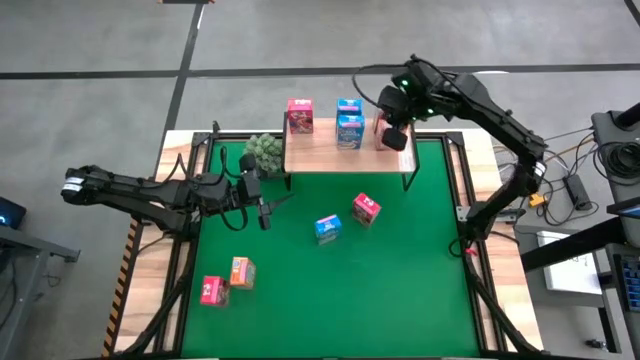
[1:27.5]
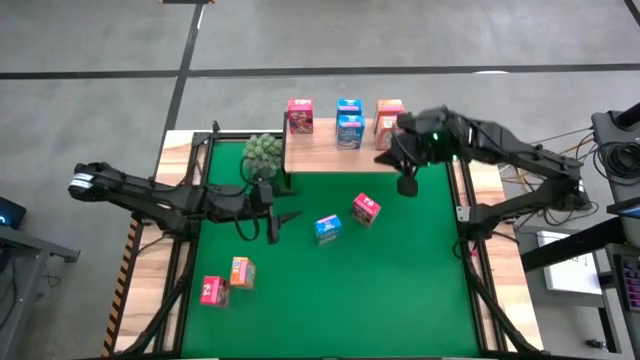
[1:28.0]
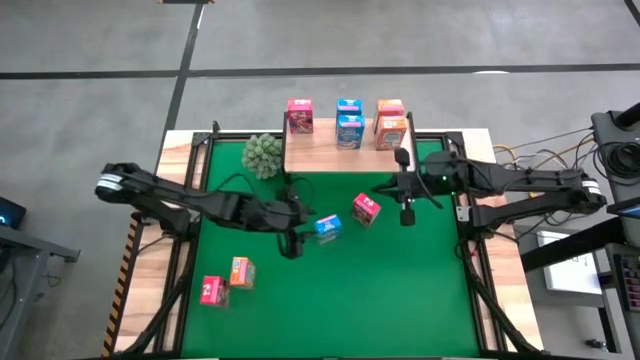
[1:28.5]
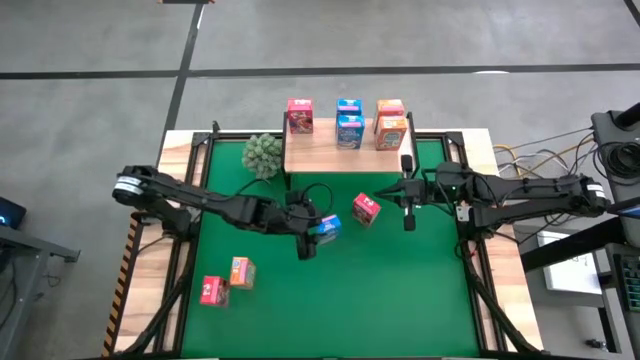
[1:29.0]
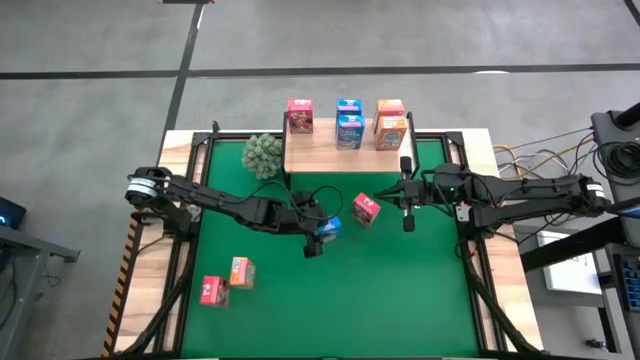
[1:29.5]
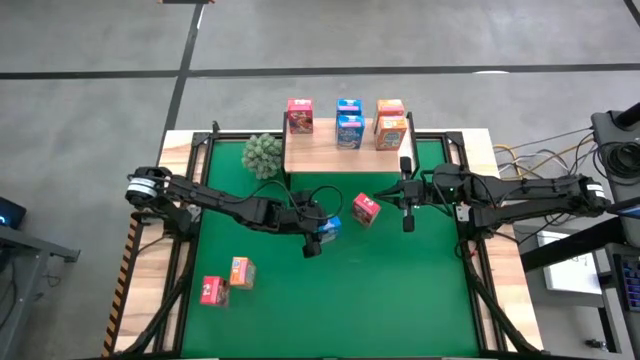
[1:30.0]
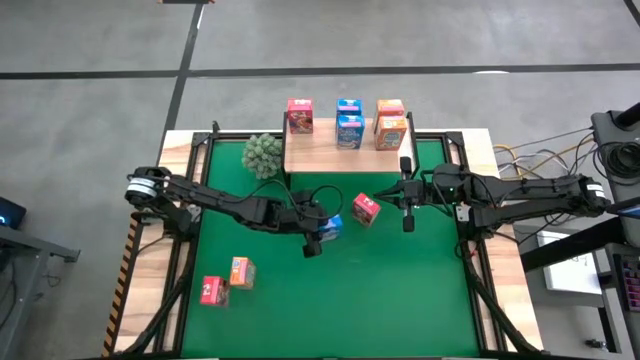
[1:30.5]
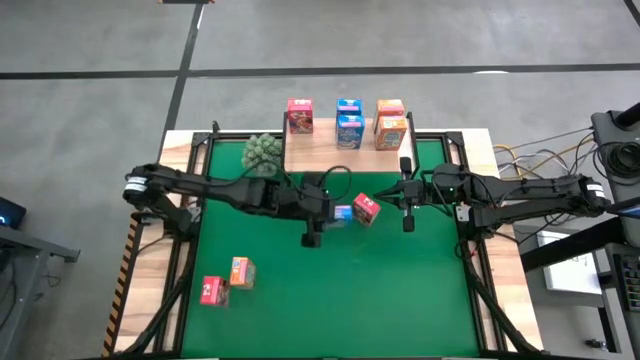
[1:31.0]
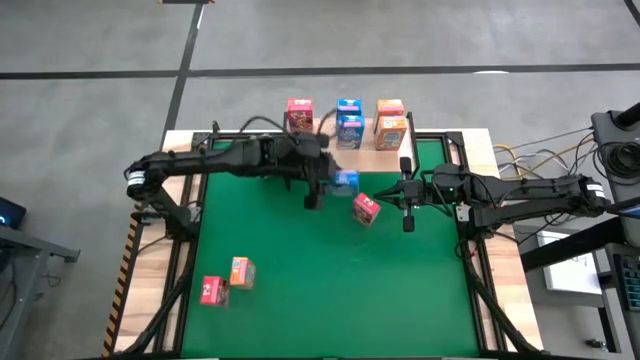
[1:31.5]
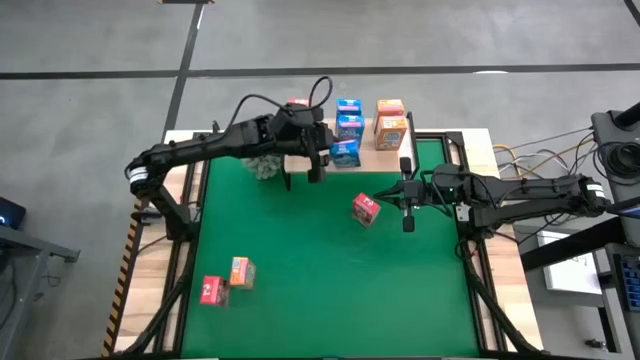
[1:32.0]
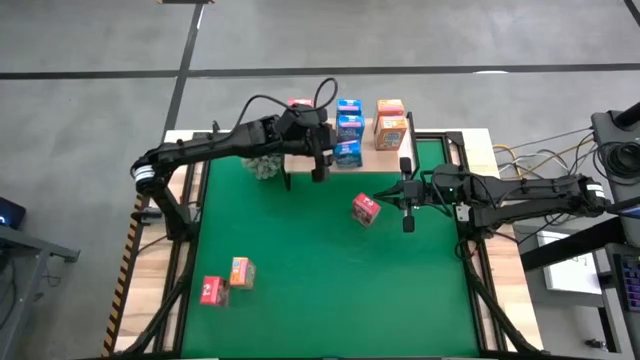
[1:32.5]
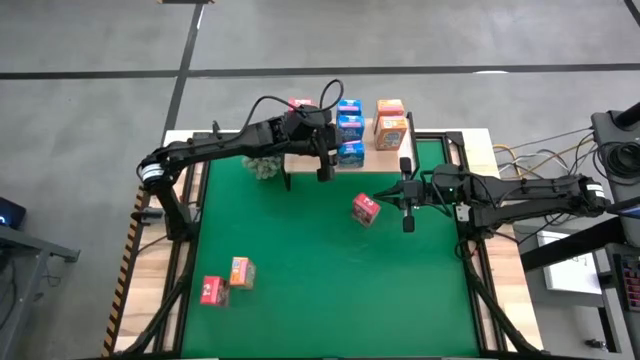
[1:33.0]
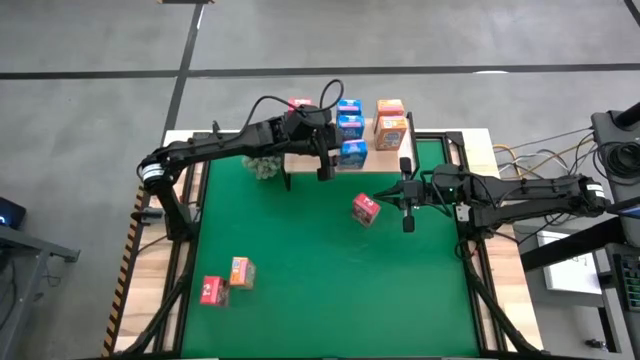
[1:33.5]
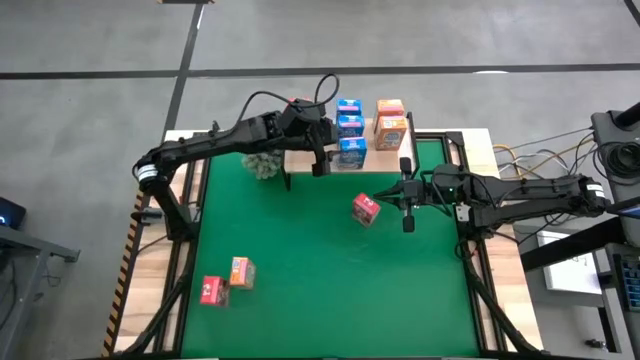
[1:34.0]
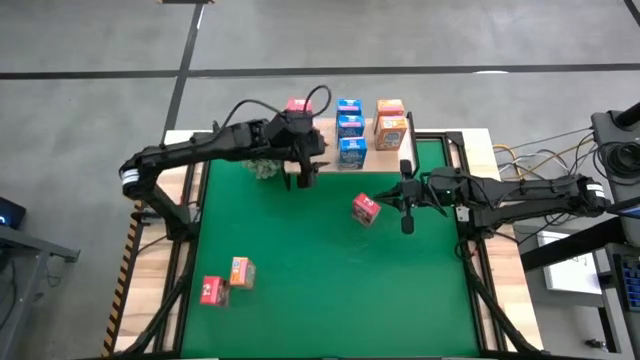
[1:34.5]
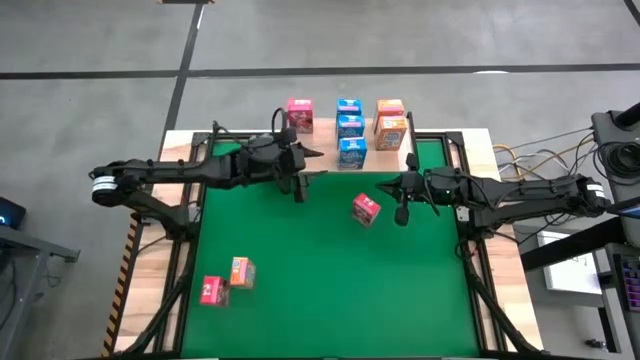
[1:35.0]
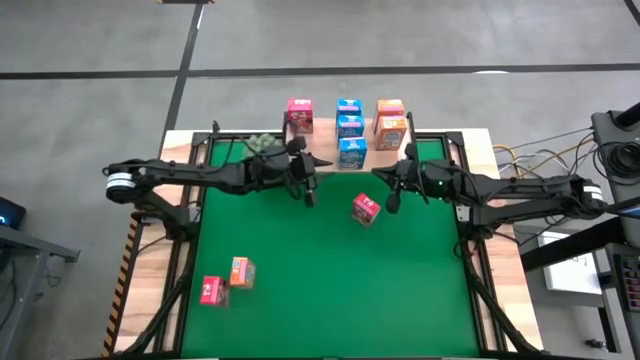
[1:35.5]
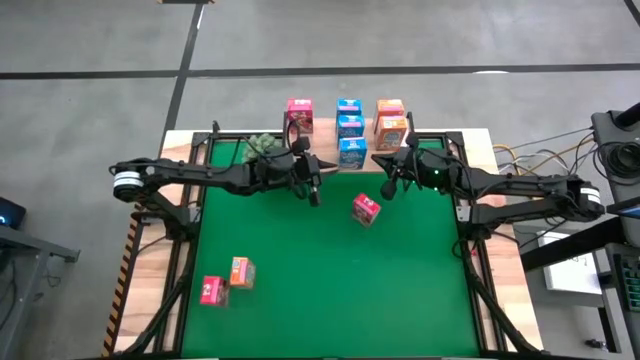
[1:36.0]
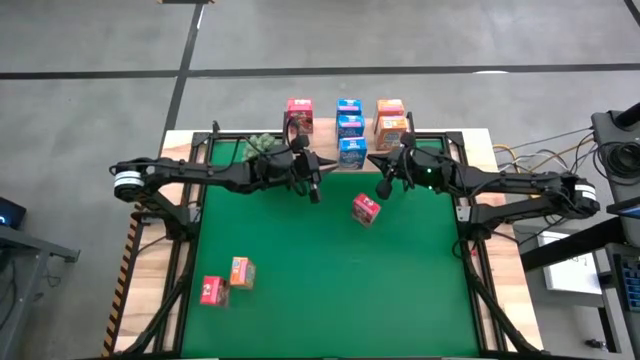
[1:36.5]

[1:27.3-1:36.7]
Task: Stack cereal on shelf
Put the blue cereal box on the shelf aligned with the other blue cereal box

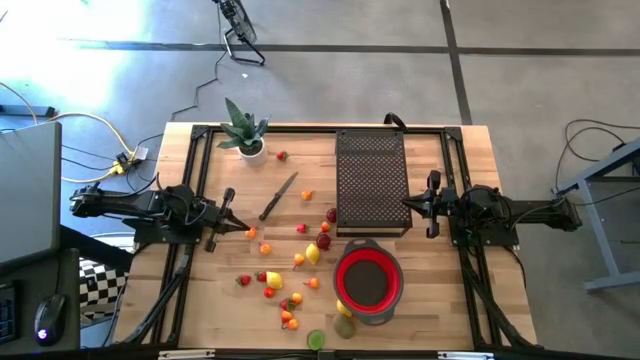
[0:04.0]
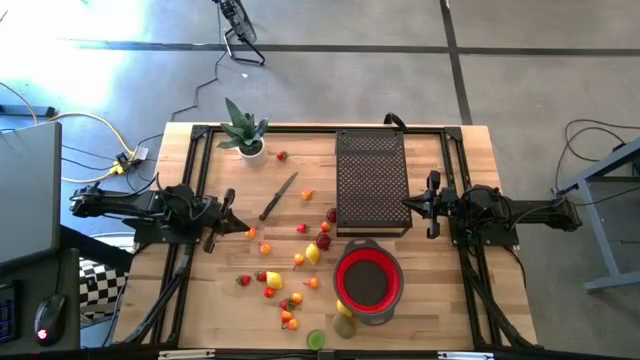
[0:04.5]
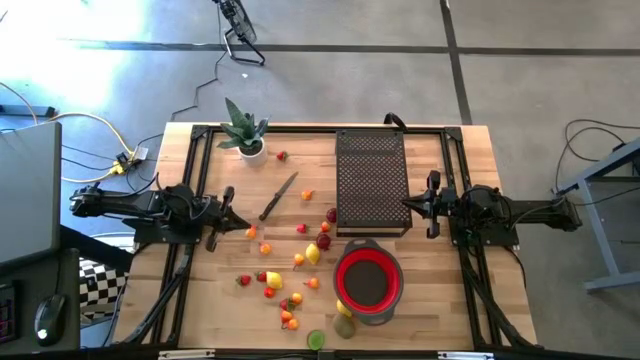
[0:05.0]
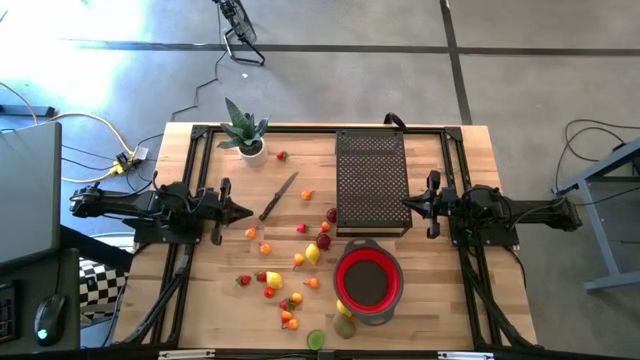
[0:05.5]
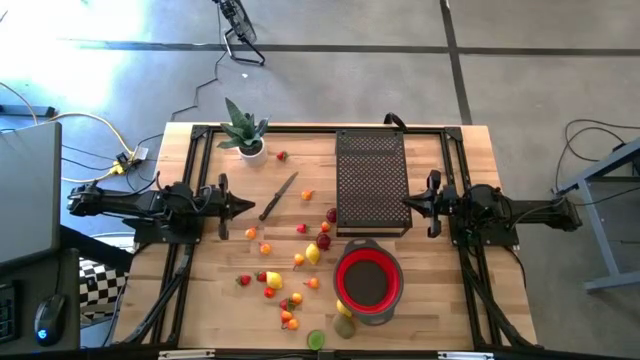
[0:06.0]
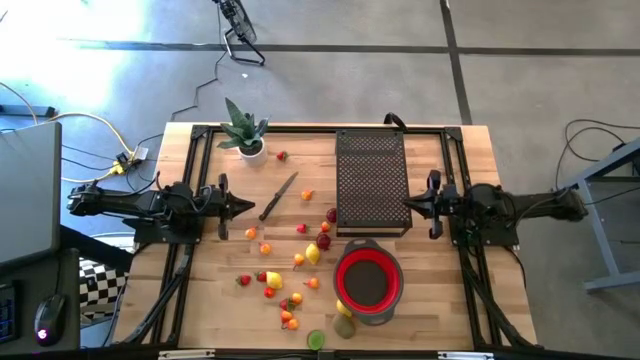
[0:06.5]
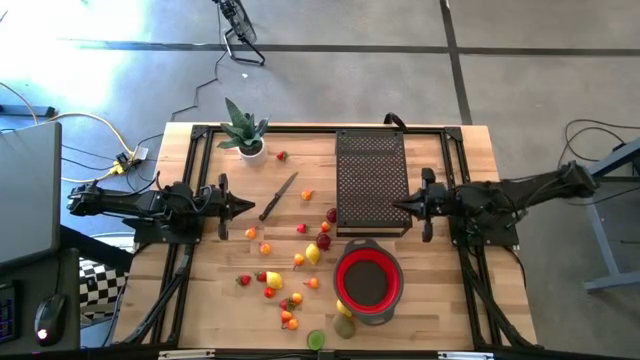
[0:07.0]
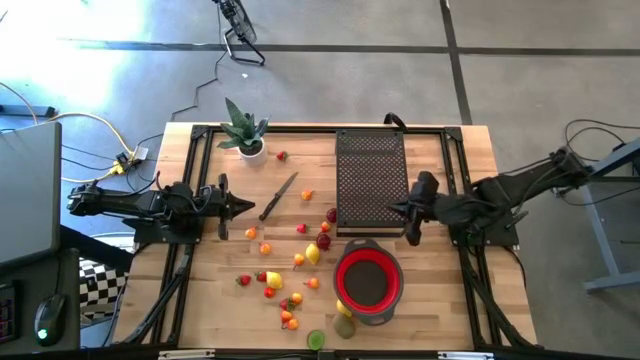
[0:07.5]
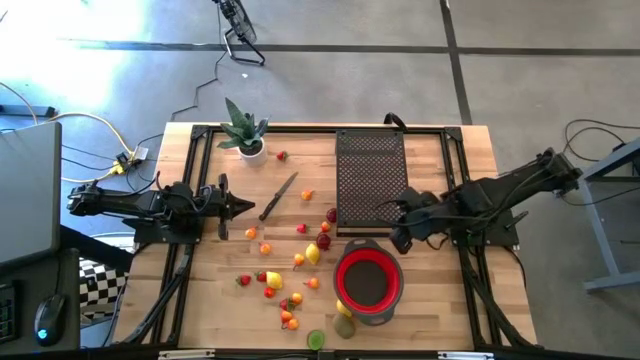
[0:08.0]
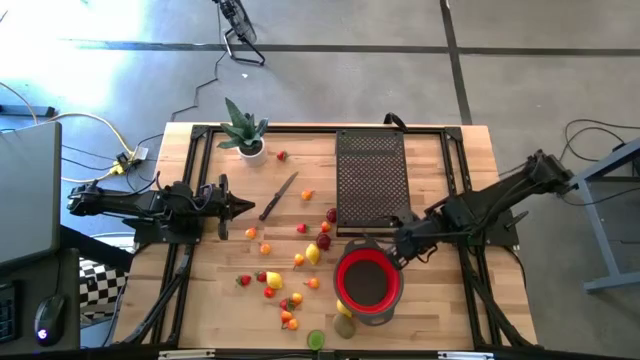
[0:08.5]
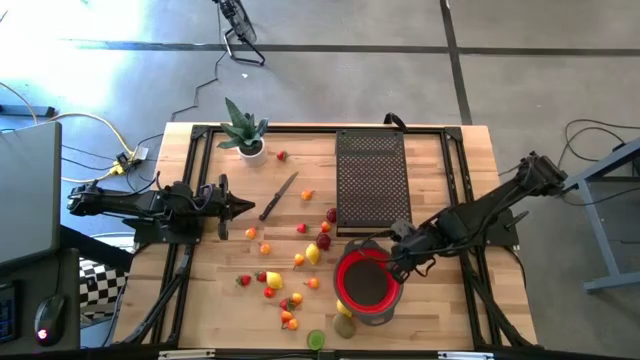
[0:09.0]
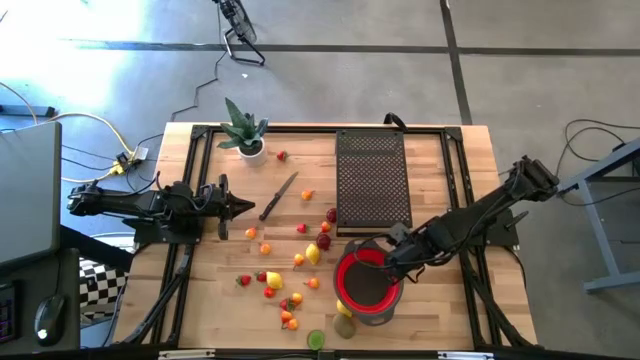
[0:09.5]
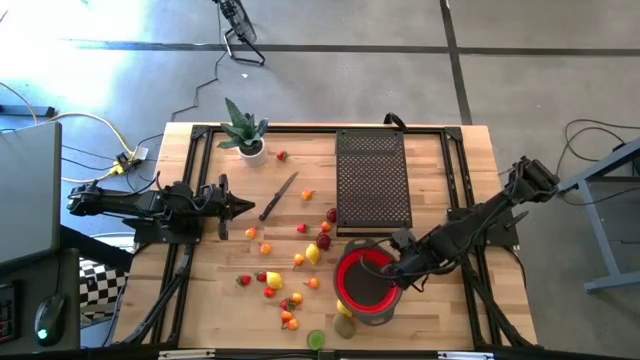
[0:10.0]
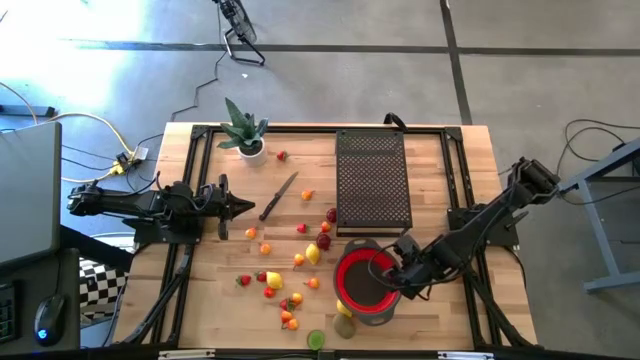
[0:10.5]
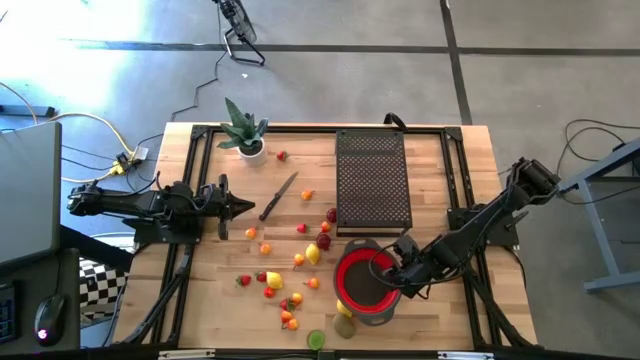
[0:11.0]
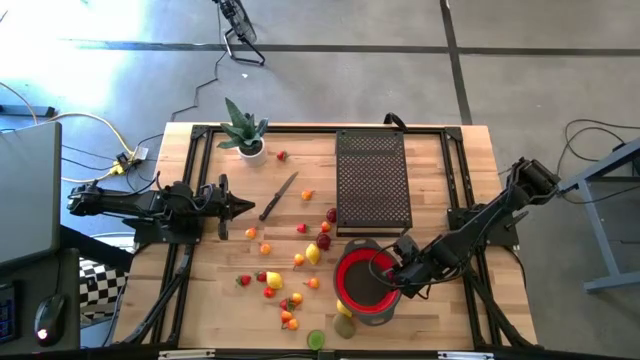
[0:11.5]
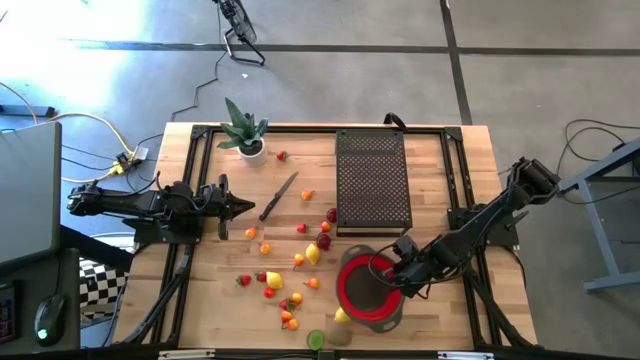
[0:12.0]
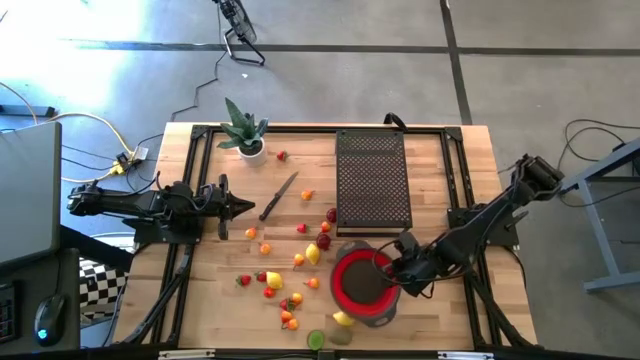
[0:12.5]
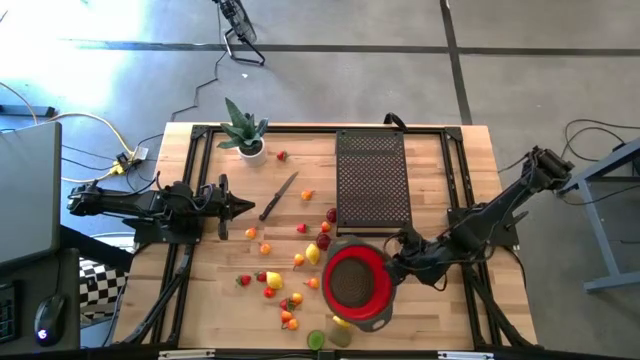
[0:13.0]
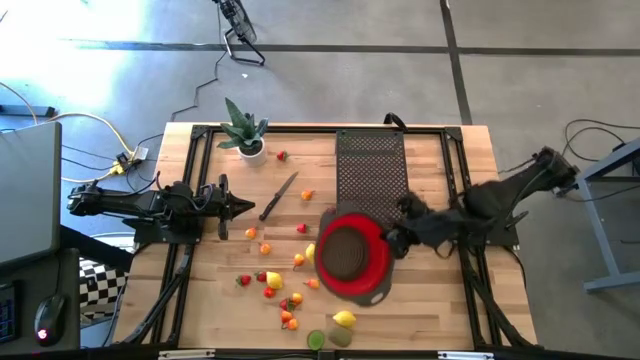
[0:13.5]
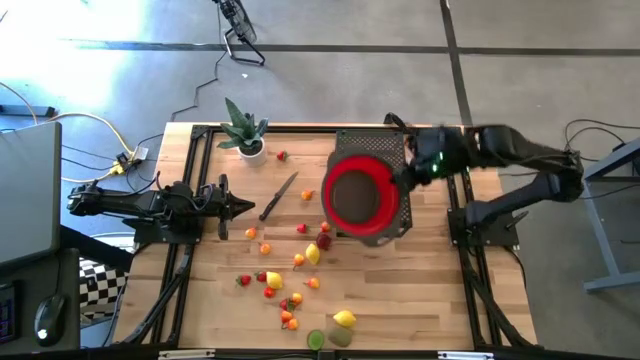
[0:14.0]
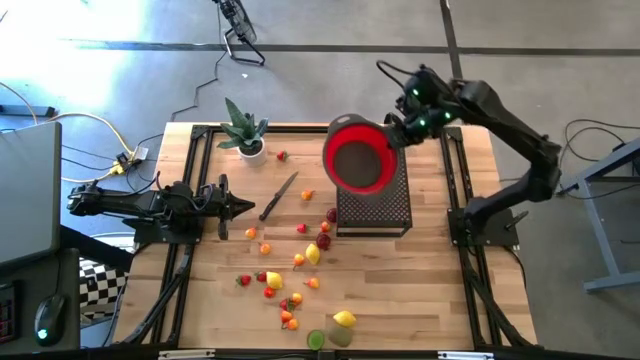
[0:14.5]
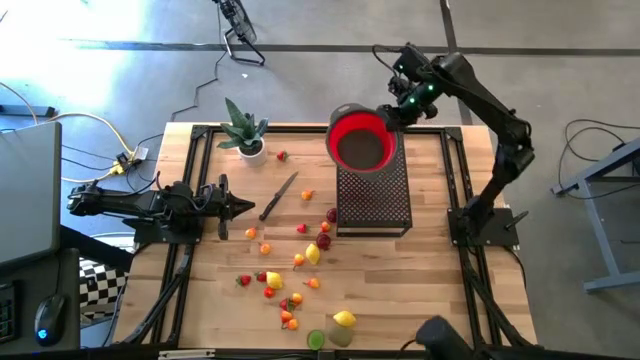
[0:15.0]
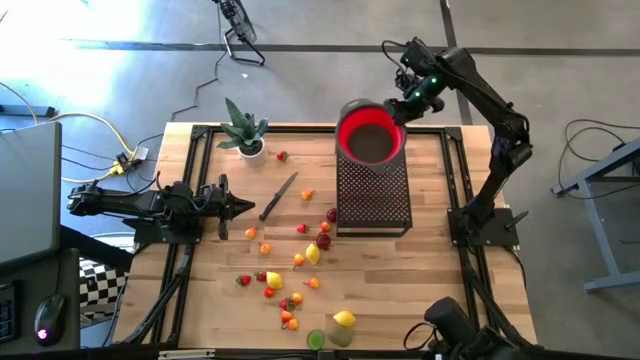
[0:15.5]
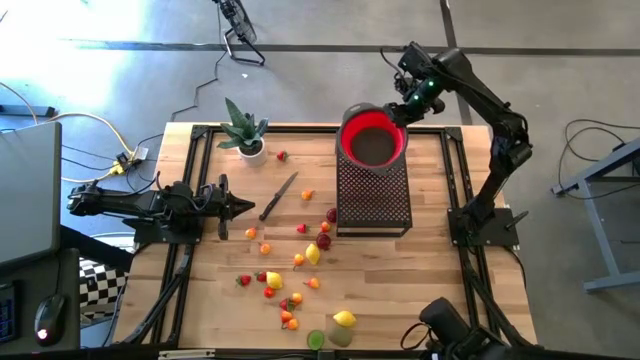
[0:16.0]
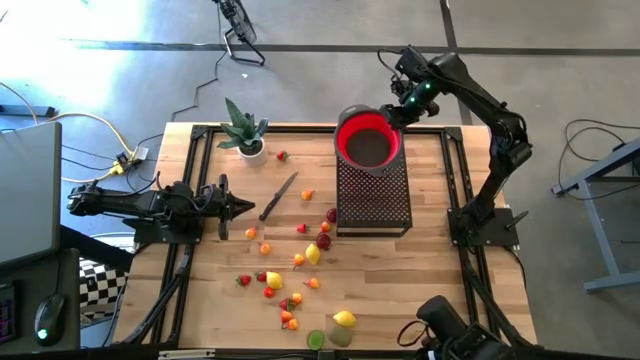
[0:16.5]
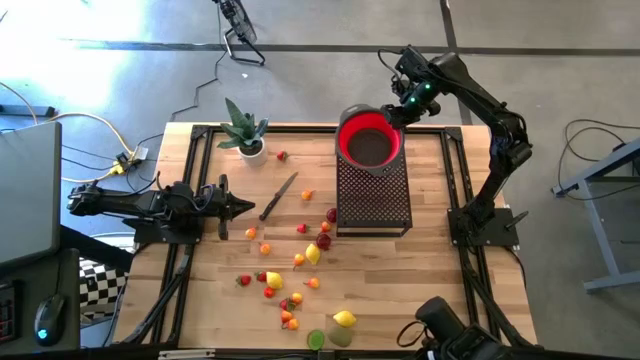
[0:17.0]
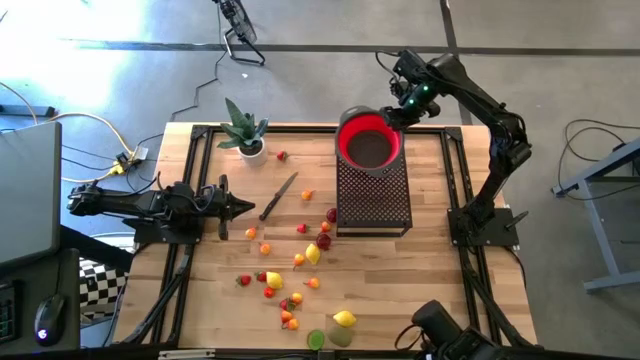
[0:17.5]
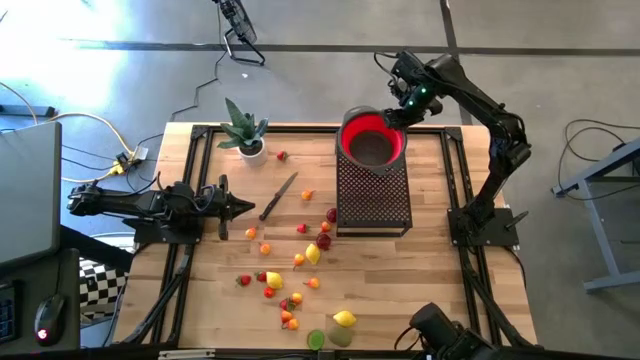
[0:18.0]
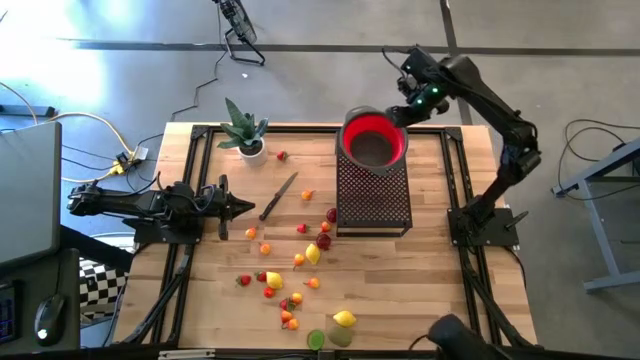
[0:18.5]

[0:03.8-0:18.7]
Task: Pick & Place Fruit
Put the red strainer bowl on the shelf
